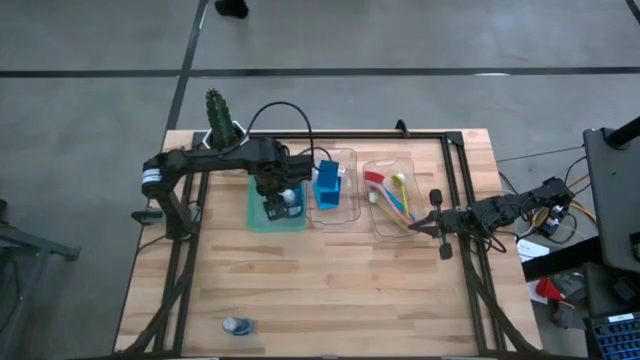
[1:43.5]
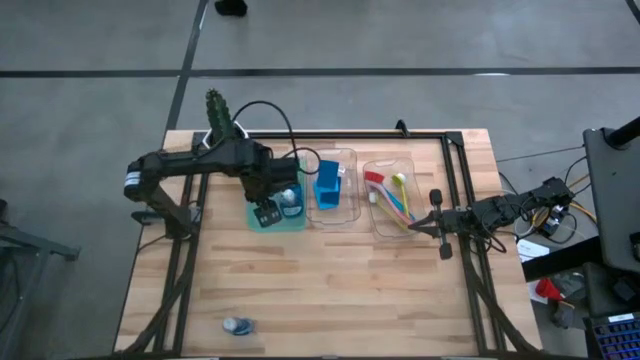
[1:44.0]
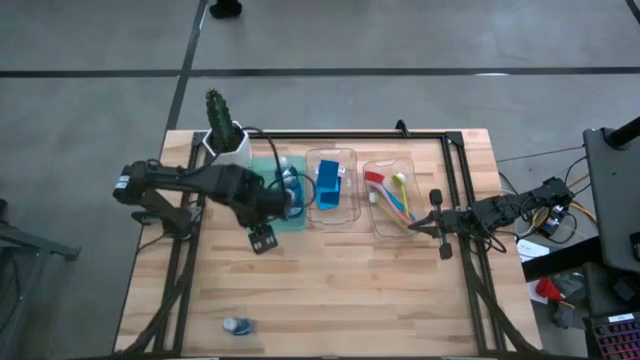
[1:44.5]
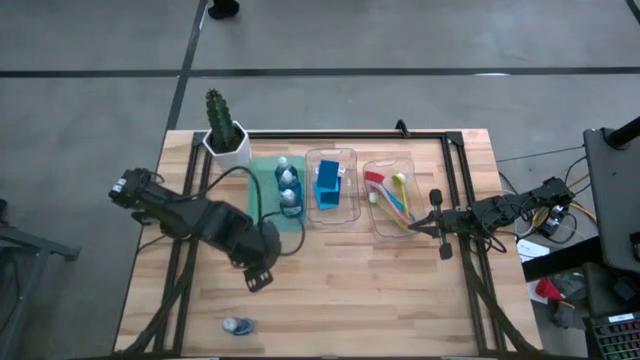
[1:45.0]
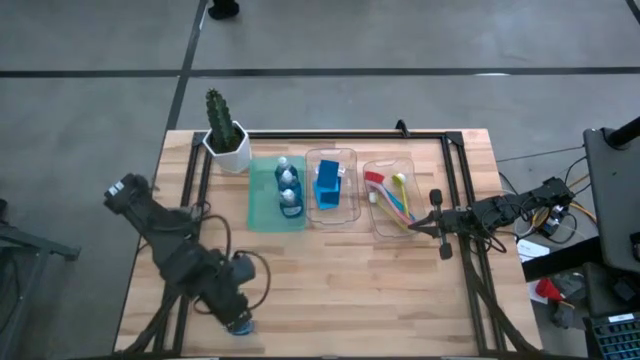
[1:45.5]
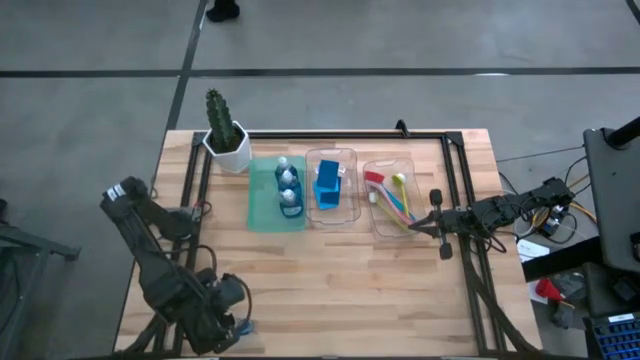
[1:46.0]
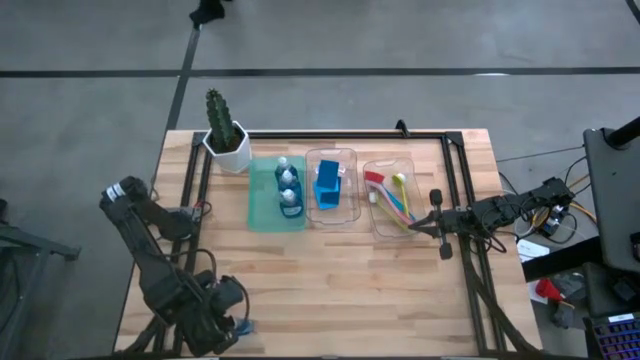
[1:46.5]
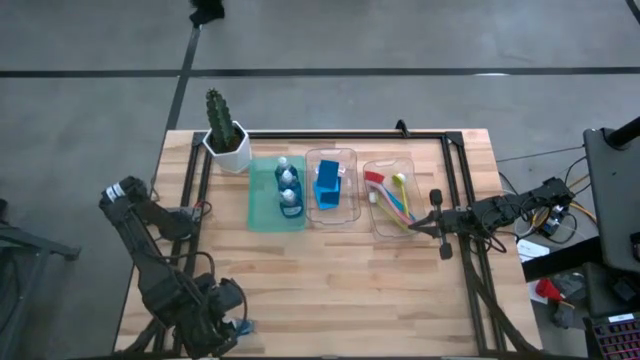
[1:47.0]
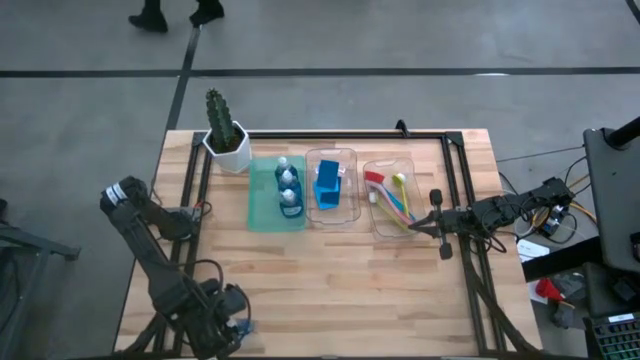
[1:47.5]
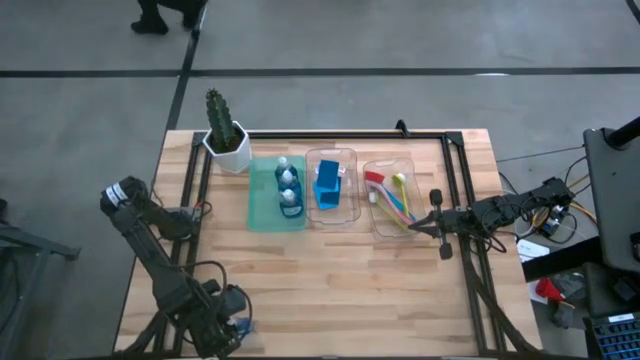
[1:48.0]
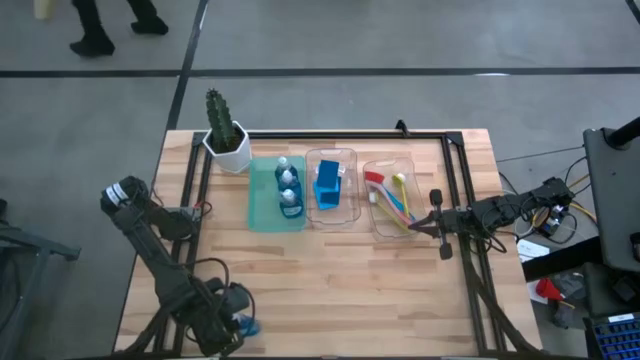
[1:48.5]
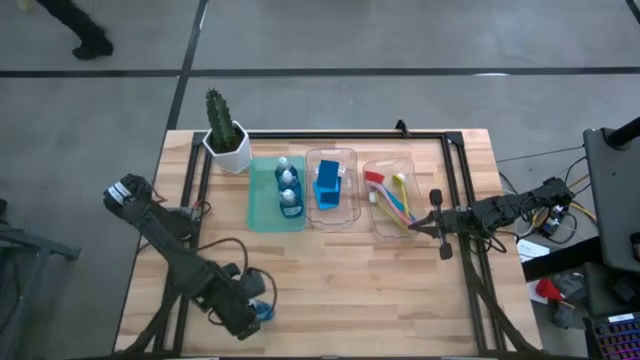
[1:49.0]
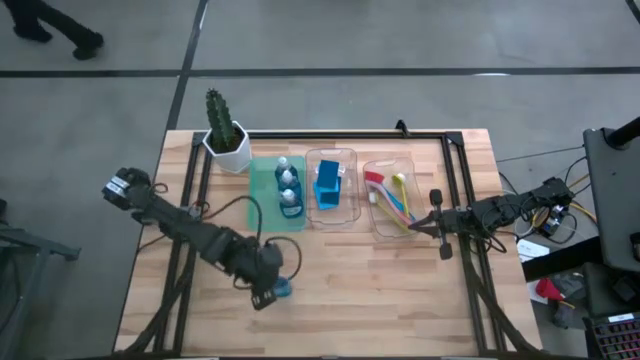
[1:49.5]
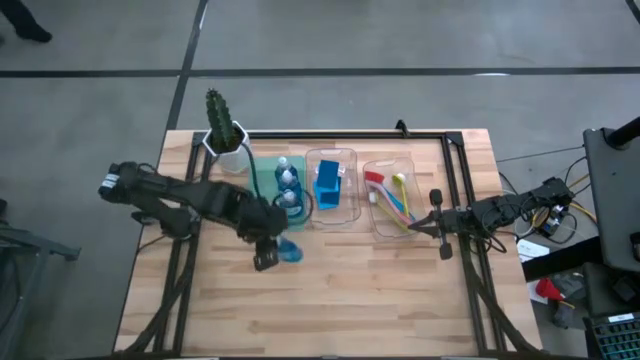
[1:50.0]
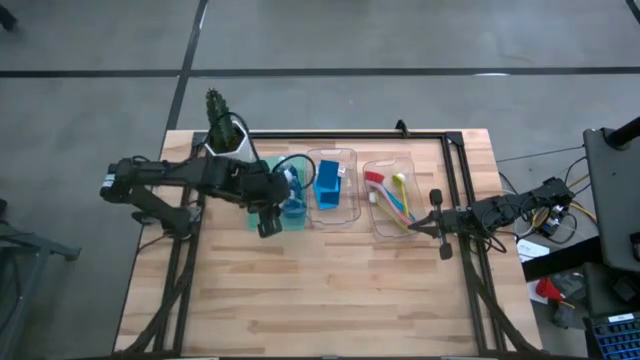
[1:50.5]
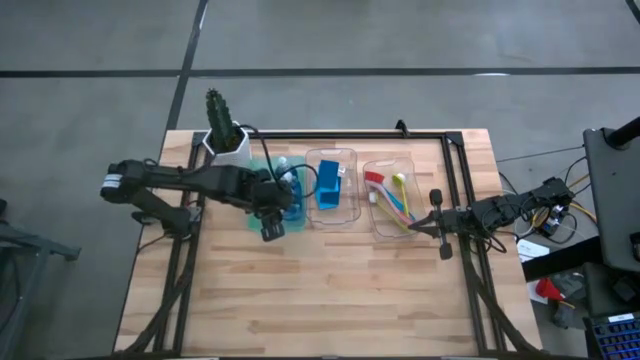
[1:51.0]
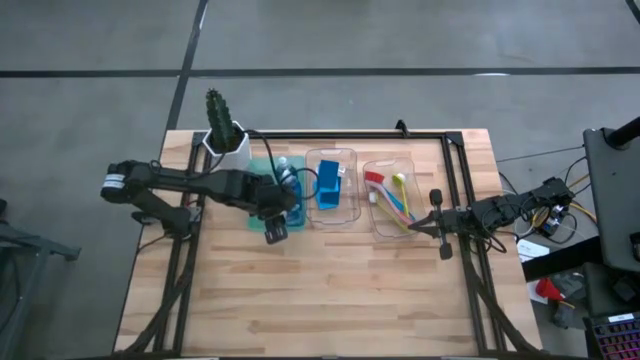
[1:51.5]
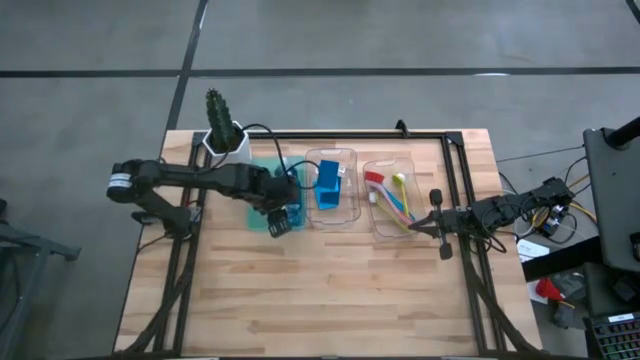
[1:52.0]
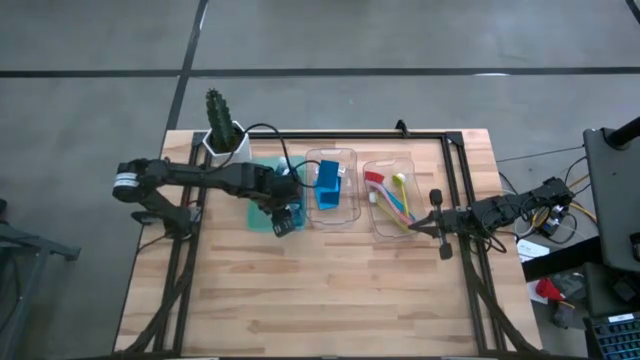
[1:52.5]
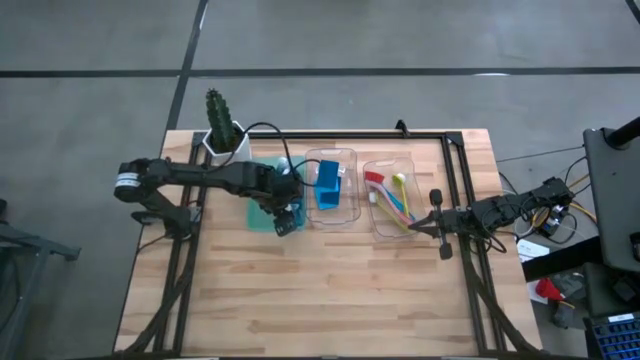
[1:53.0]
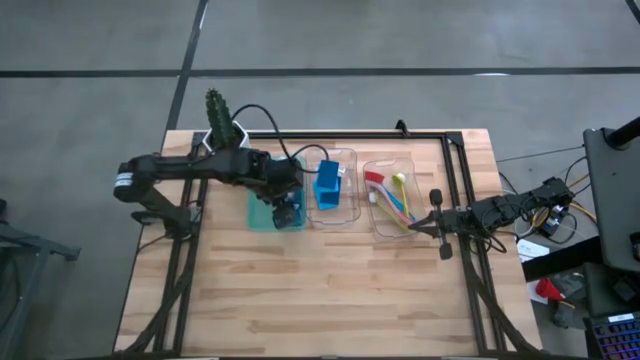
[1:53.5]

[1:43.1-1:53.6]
Task: Pick & Place Kitchen Sink Supplies
Put the blue liquid soap into the green bin

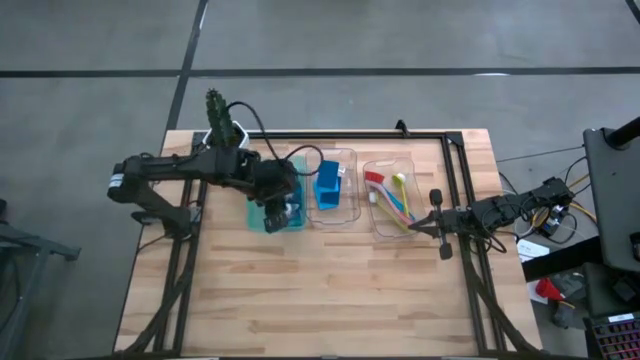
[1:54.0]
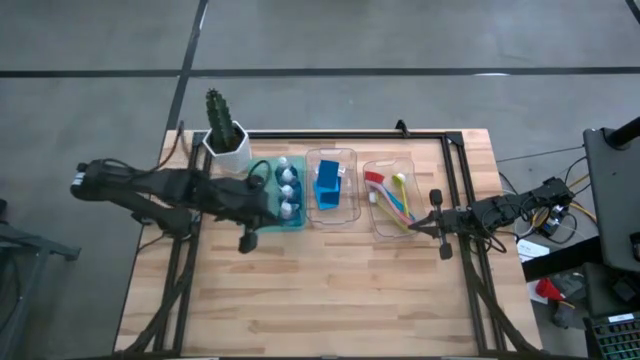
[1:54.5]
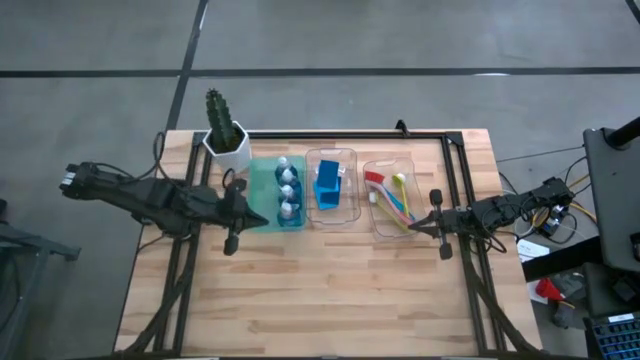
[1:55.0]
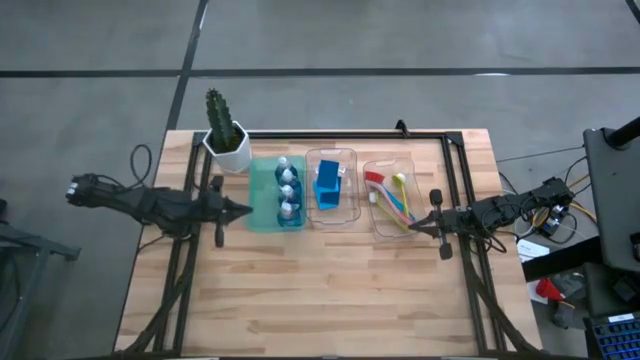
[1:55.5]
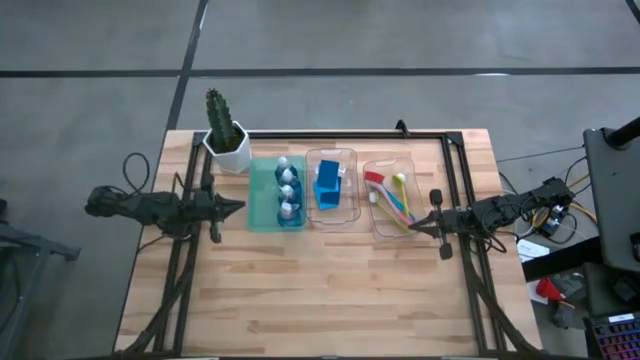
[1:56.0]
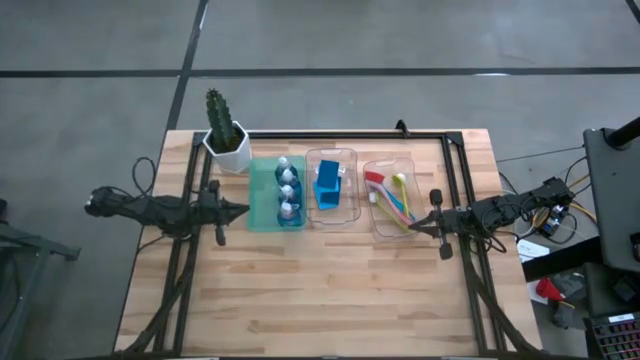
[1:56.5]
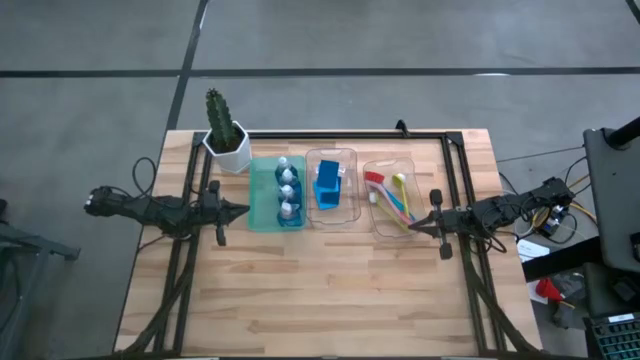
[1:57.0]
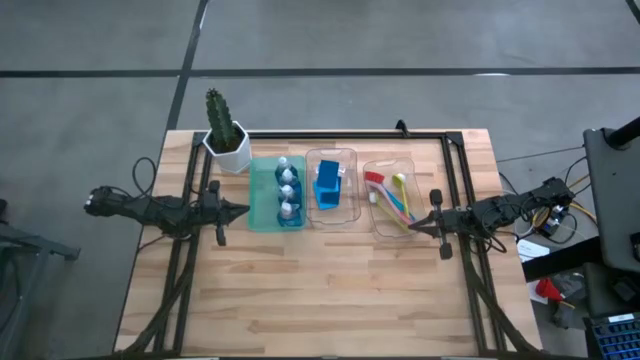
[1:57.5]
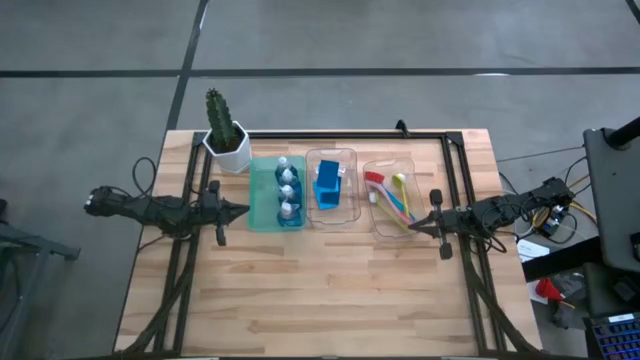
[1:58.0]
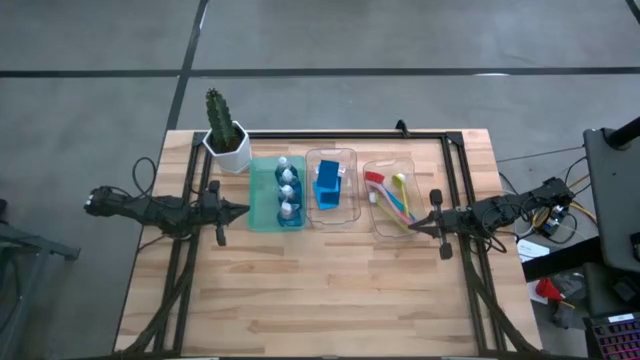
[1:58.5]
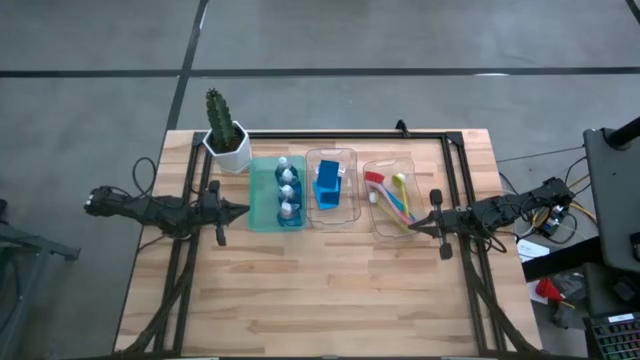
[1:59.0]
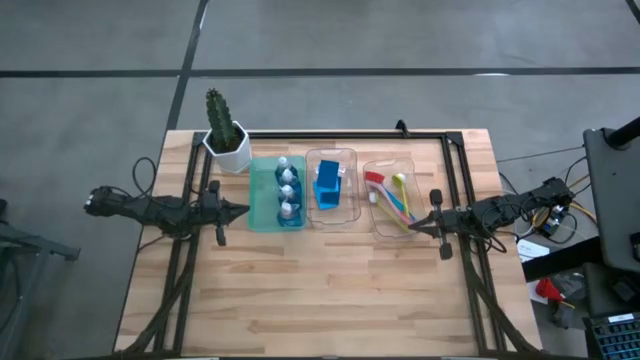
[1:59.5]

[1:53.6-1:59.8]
Return to Home Position

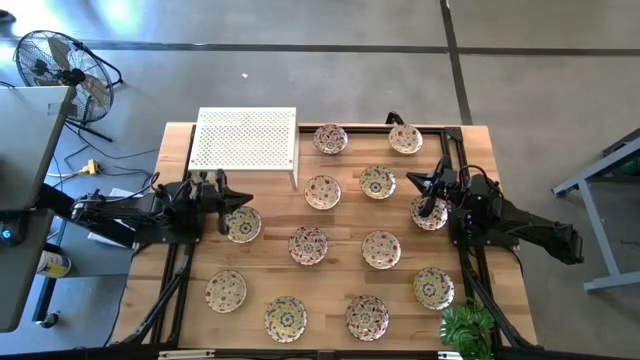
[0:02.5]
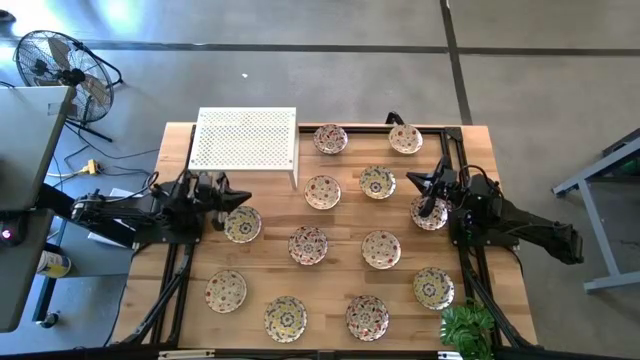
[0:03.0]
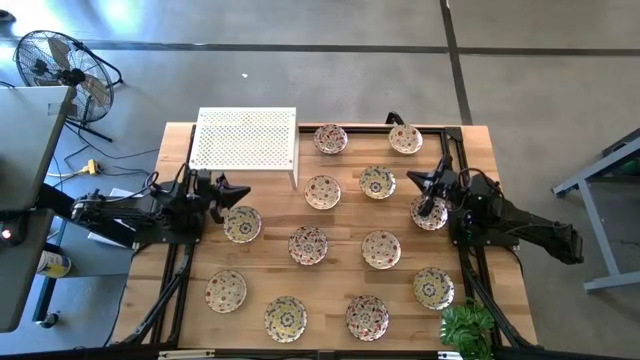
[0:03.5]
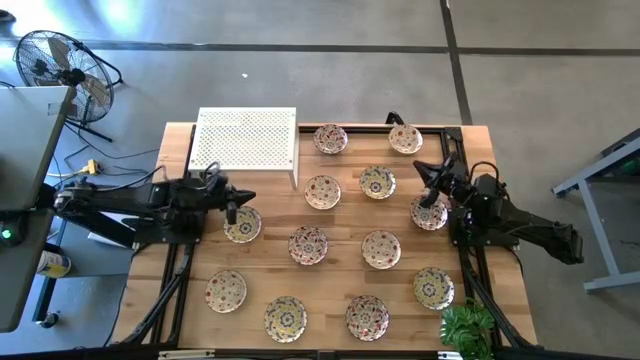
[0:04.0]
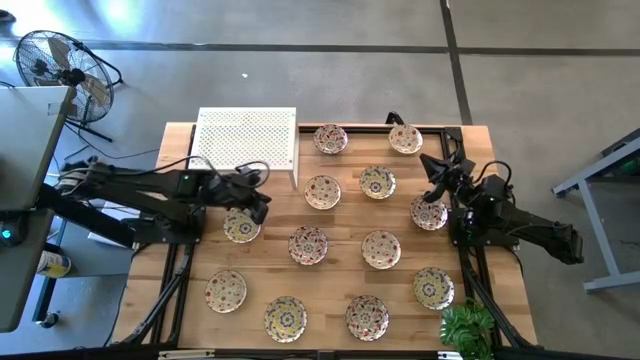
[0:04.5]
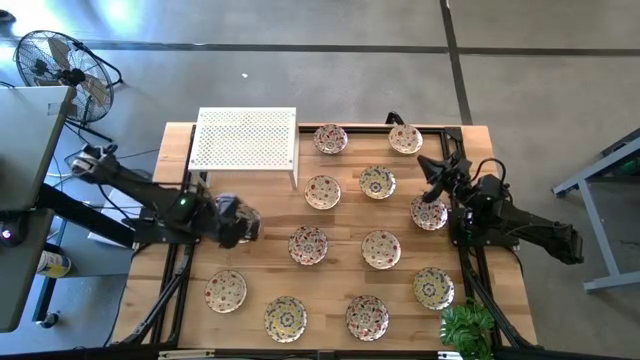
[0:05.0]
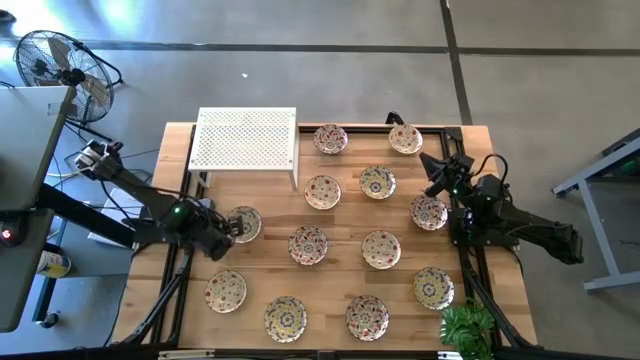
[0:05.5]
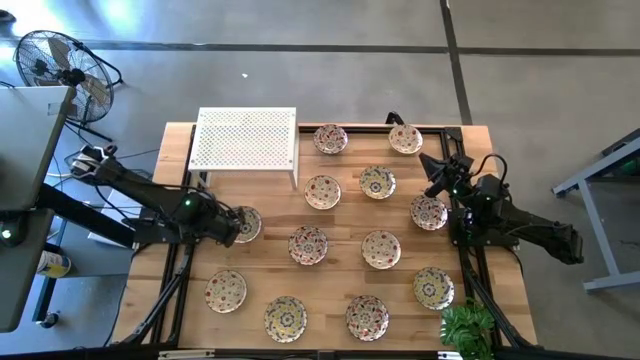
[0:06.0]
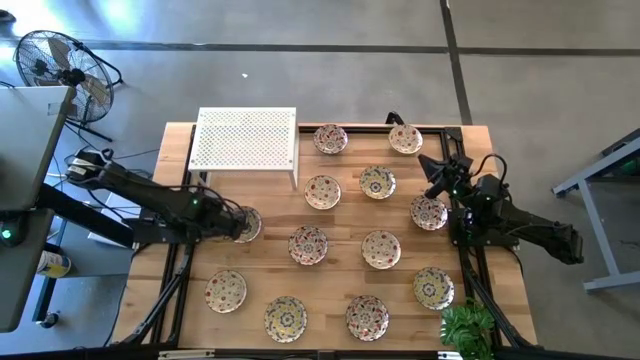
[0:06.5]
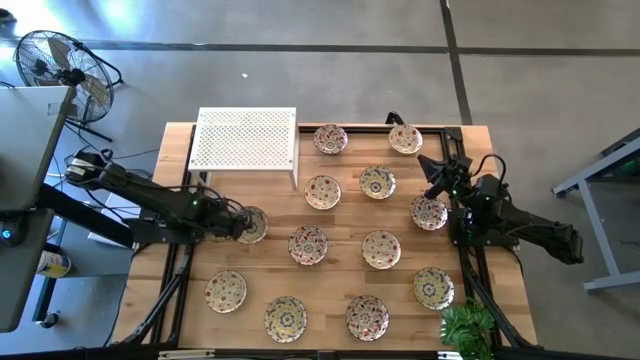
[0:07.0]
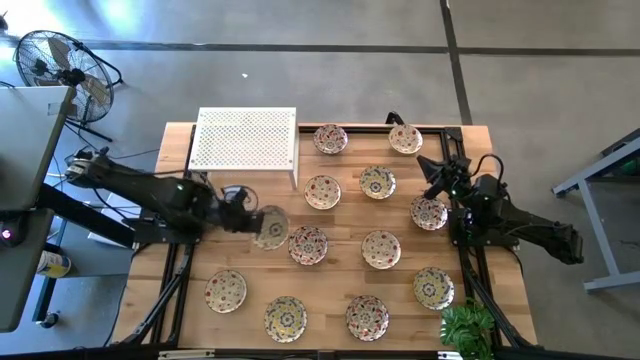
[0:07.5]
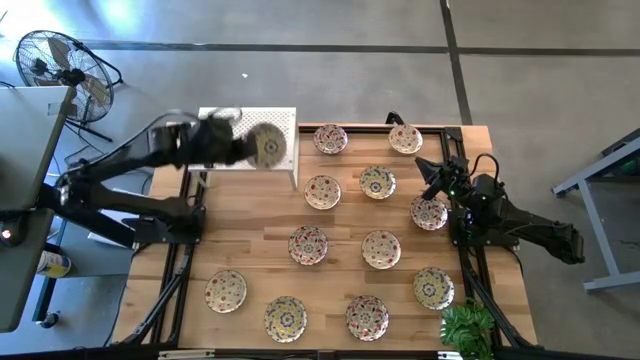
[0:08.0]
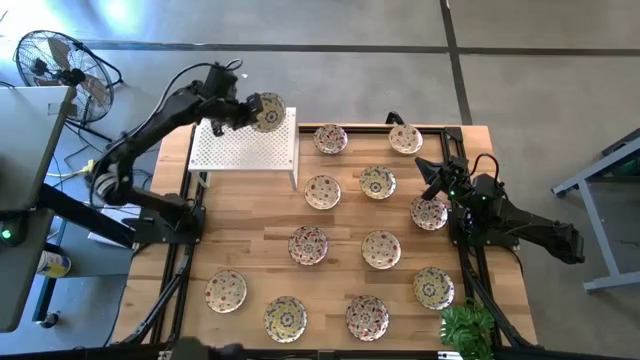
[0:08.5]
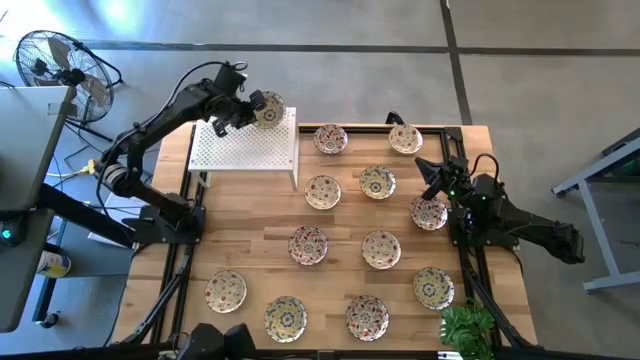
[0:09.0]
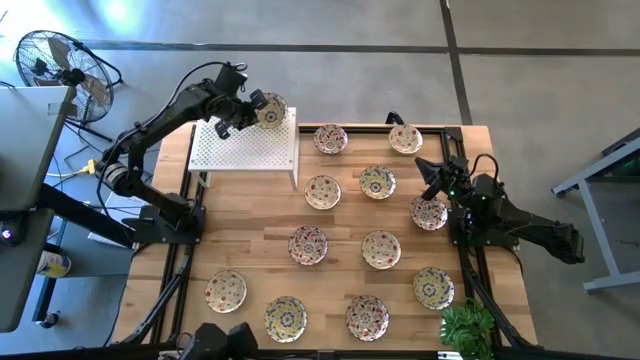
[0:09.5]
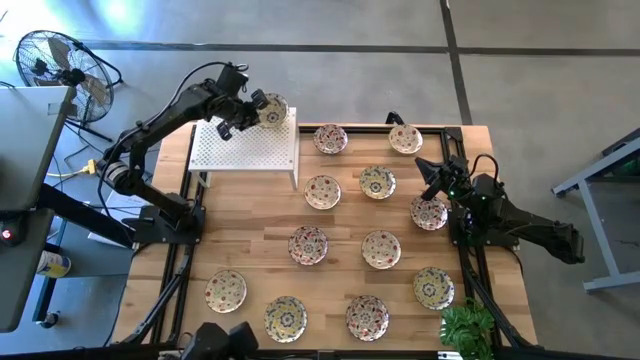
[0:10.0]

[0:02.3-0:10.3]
Task: Pick & Place Mini bowls
Put the yellow patterned bowl on the shelf
